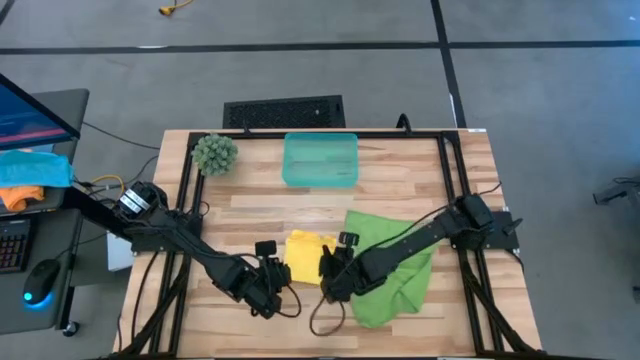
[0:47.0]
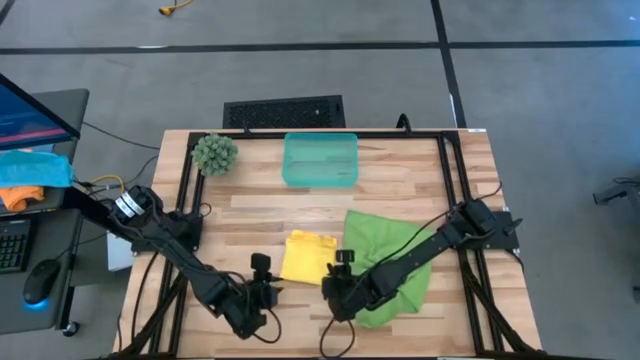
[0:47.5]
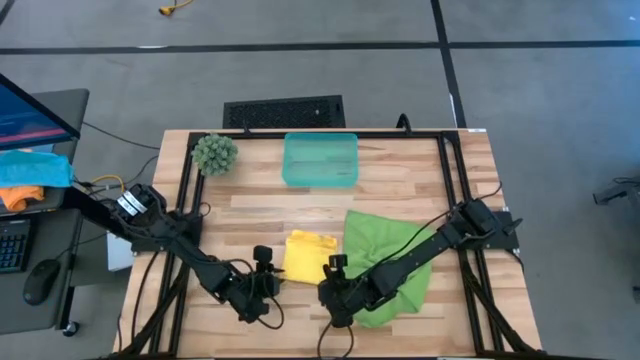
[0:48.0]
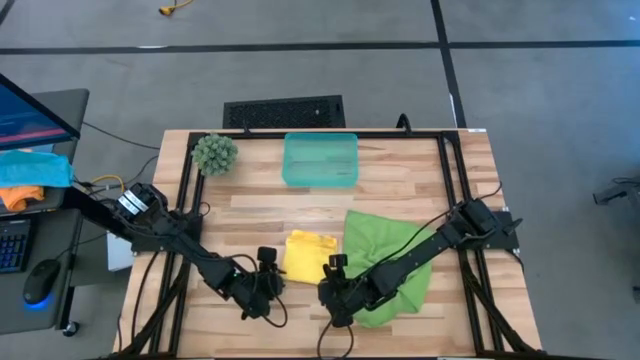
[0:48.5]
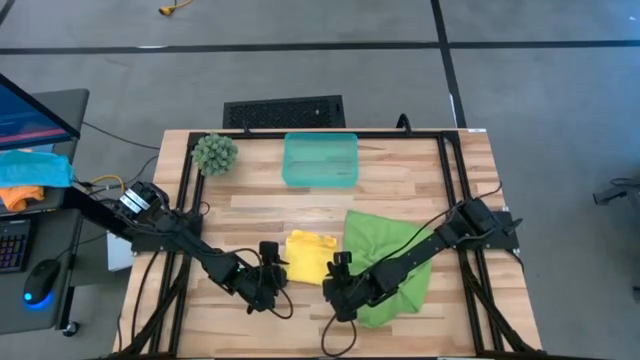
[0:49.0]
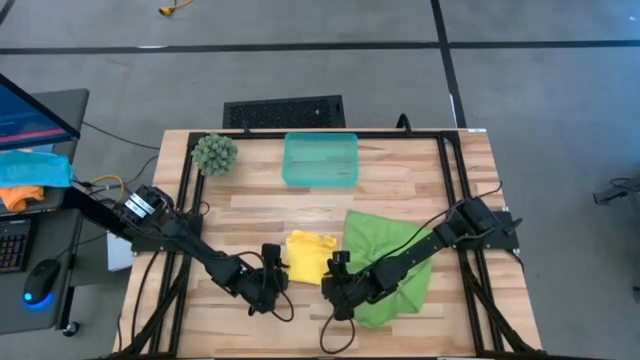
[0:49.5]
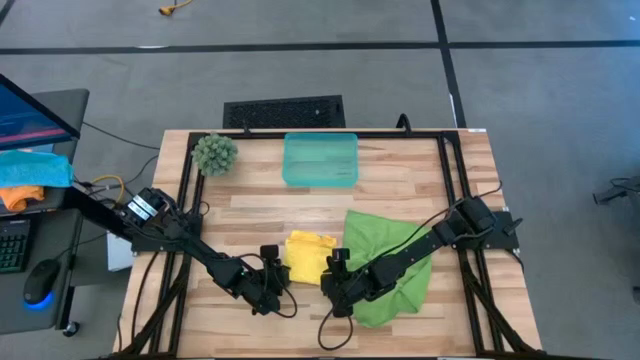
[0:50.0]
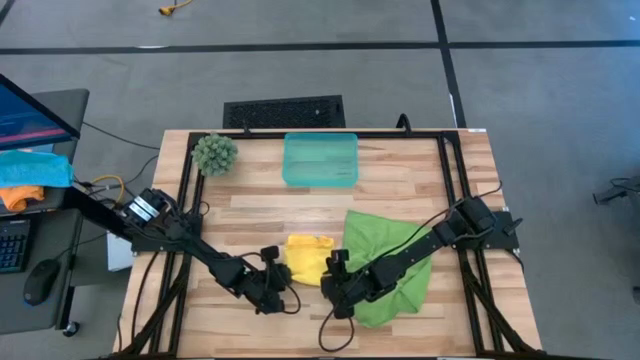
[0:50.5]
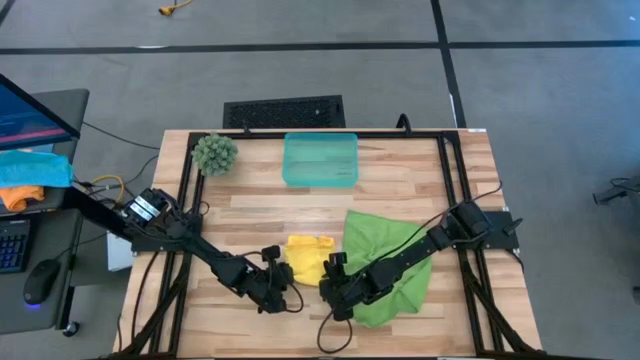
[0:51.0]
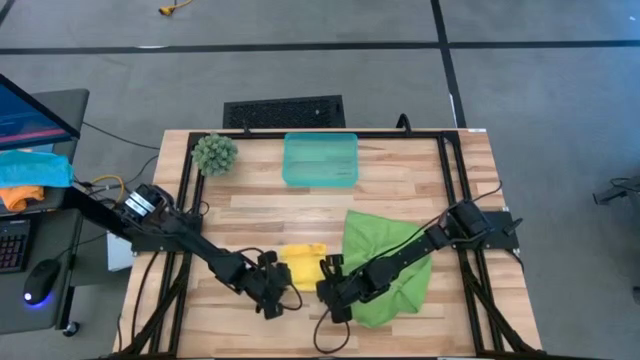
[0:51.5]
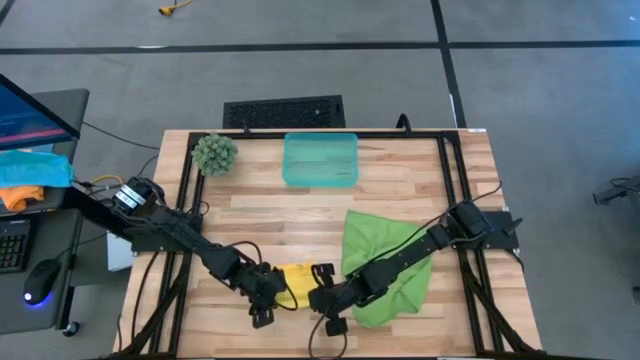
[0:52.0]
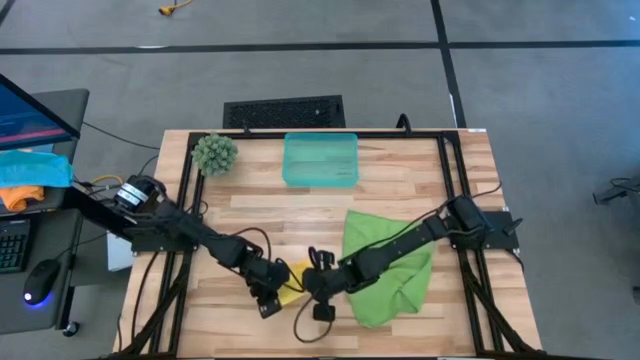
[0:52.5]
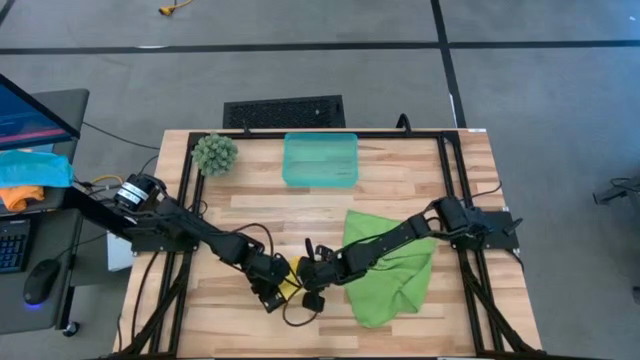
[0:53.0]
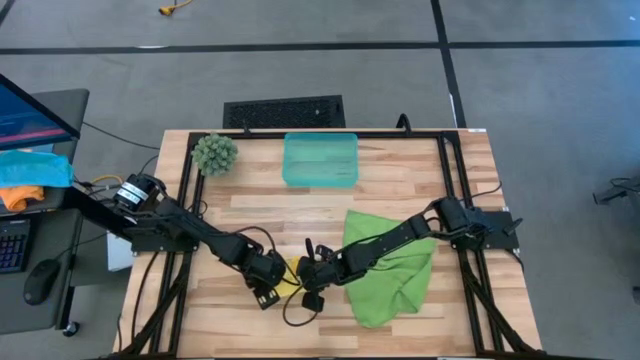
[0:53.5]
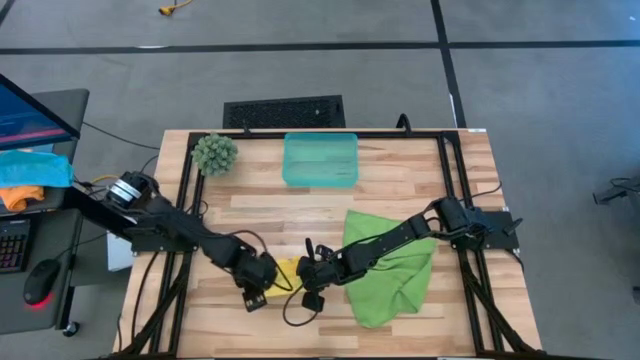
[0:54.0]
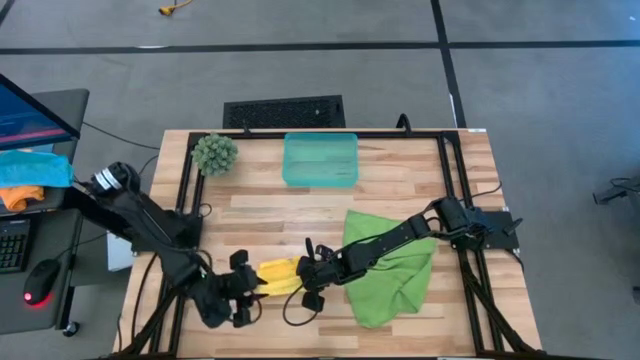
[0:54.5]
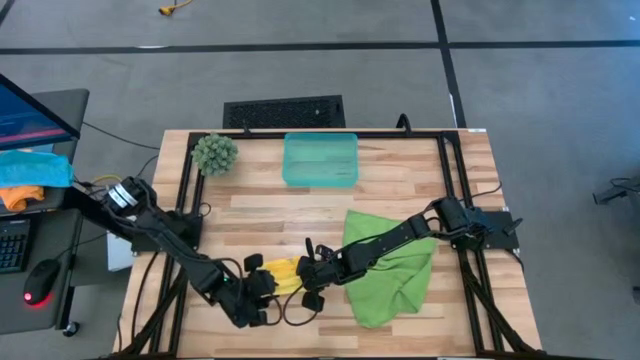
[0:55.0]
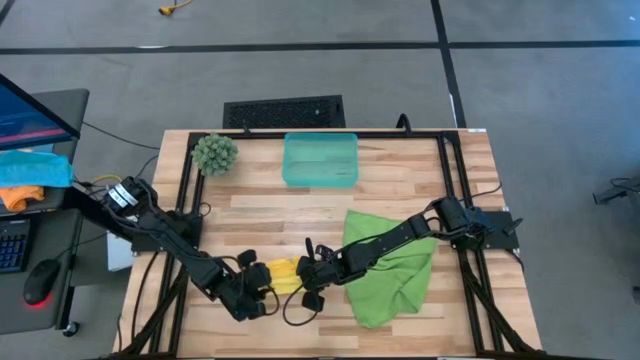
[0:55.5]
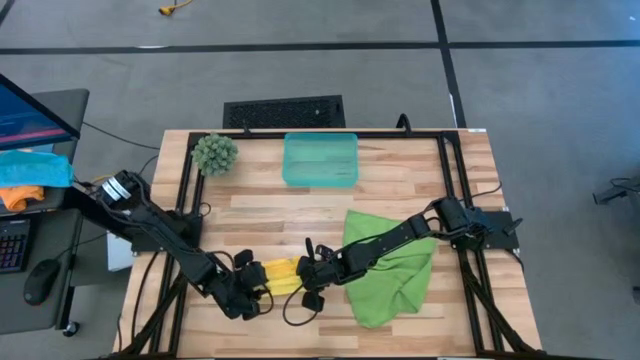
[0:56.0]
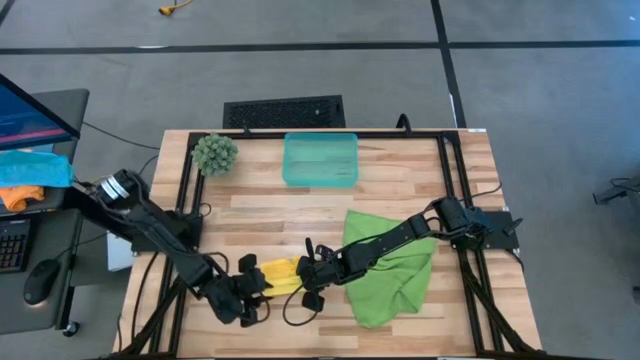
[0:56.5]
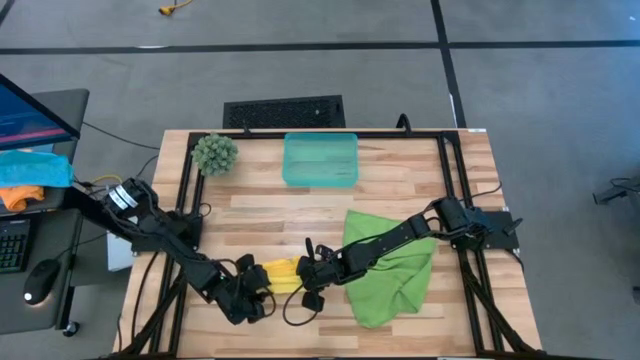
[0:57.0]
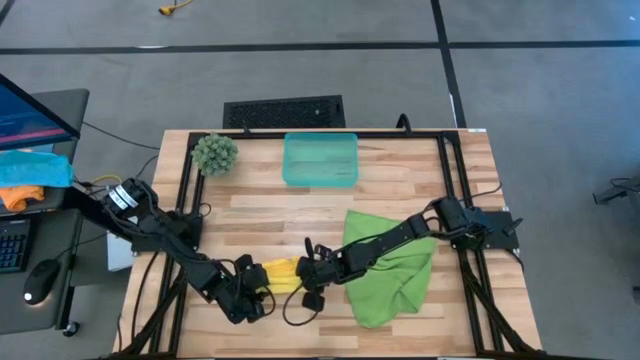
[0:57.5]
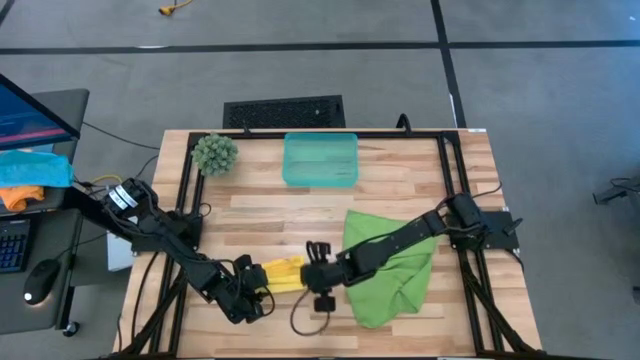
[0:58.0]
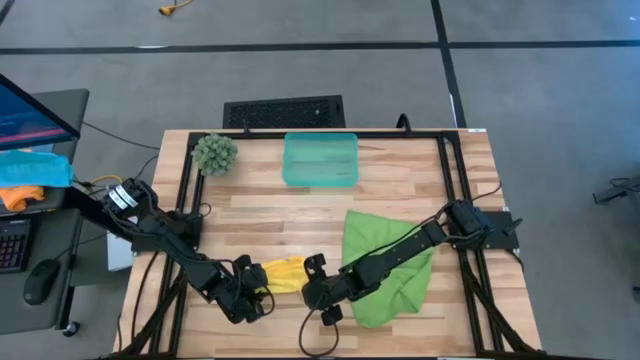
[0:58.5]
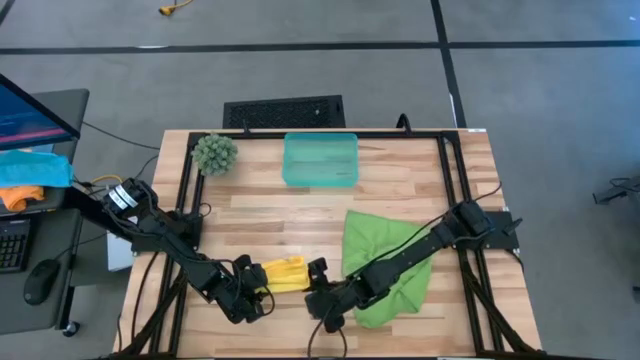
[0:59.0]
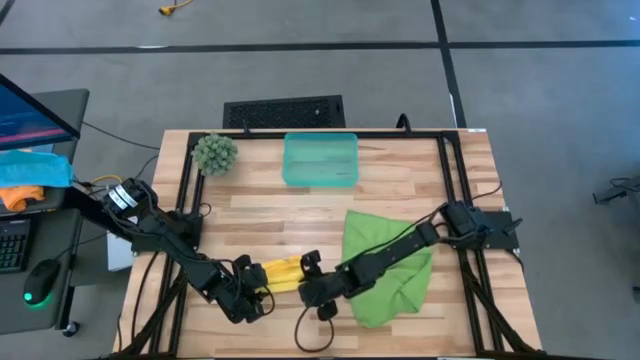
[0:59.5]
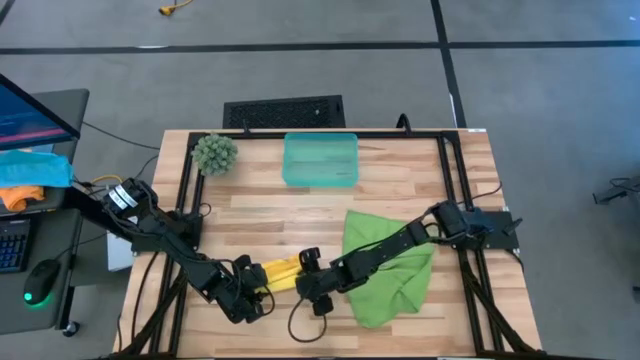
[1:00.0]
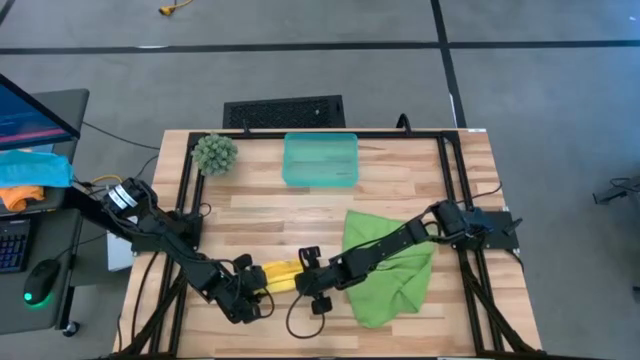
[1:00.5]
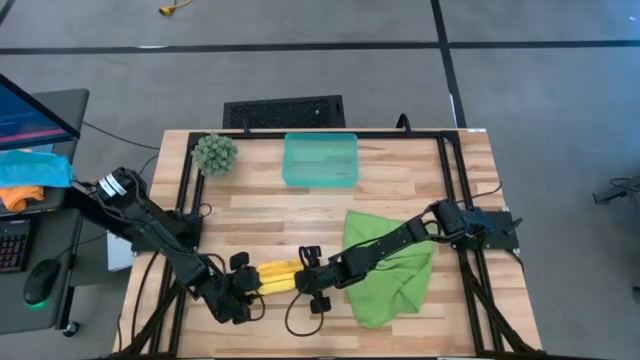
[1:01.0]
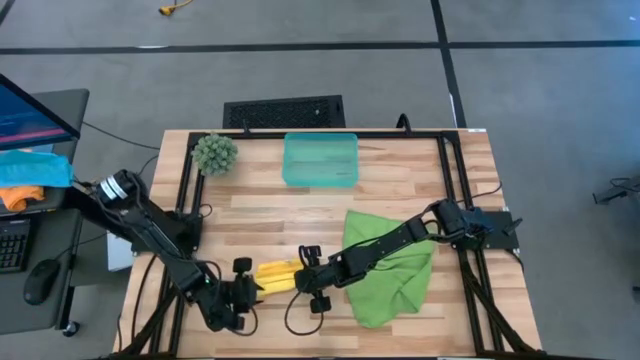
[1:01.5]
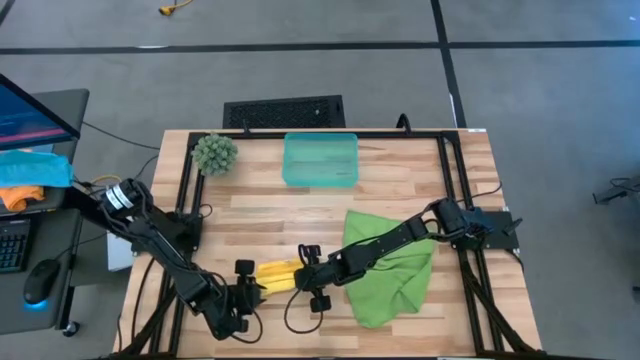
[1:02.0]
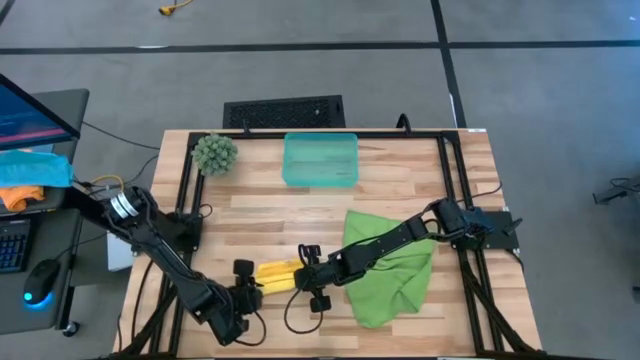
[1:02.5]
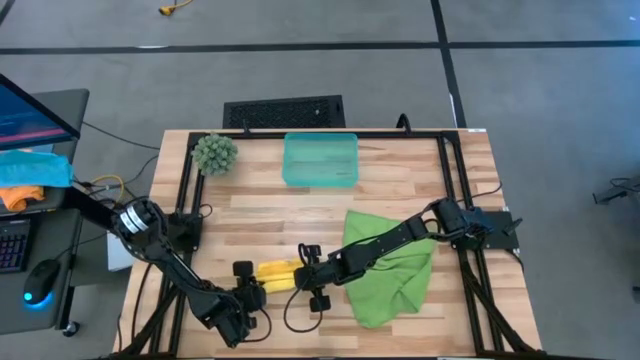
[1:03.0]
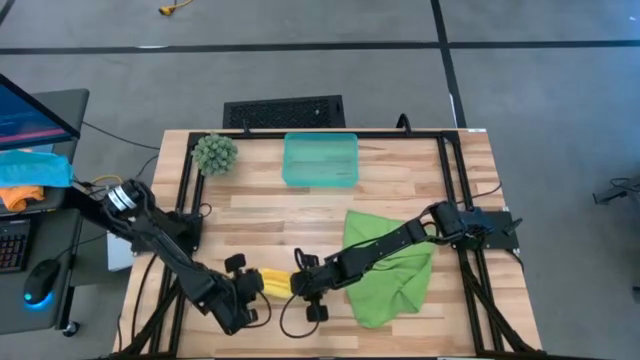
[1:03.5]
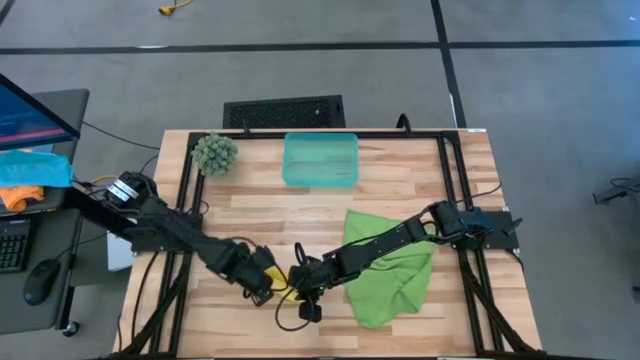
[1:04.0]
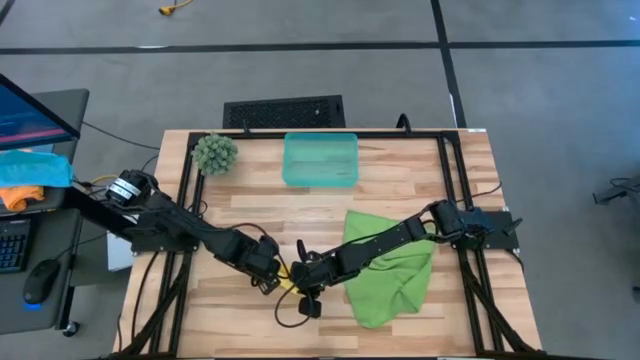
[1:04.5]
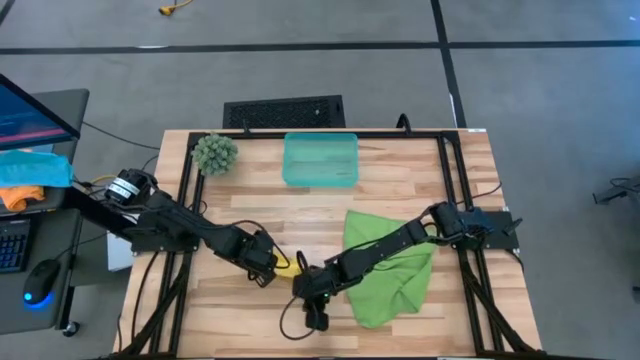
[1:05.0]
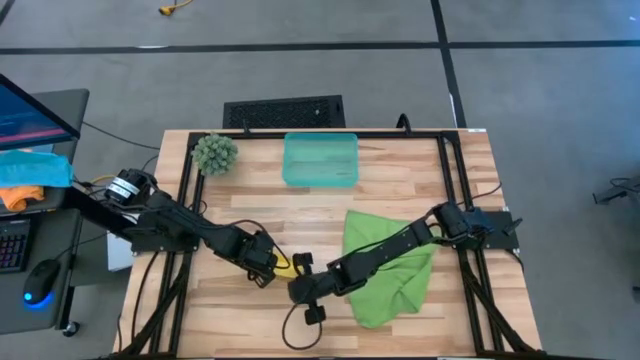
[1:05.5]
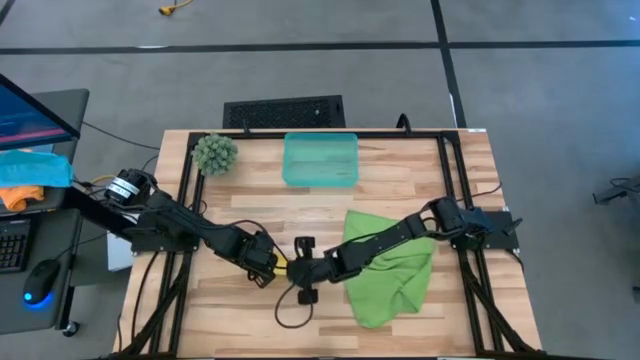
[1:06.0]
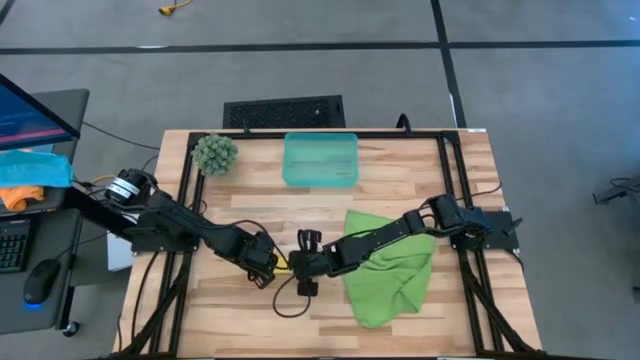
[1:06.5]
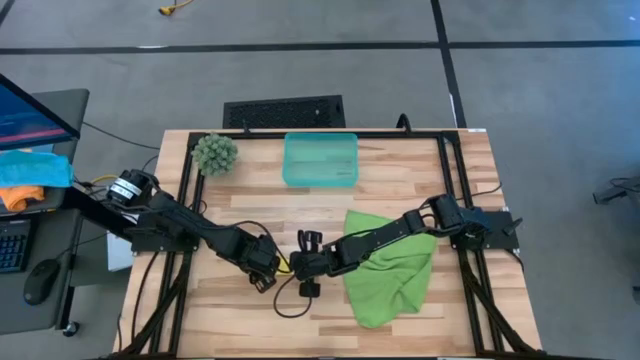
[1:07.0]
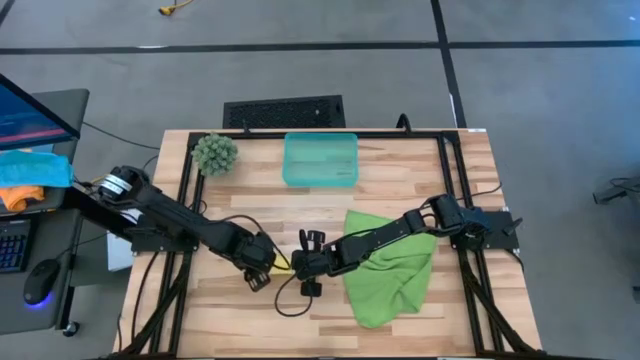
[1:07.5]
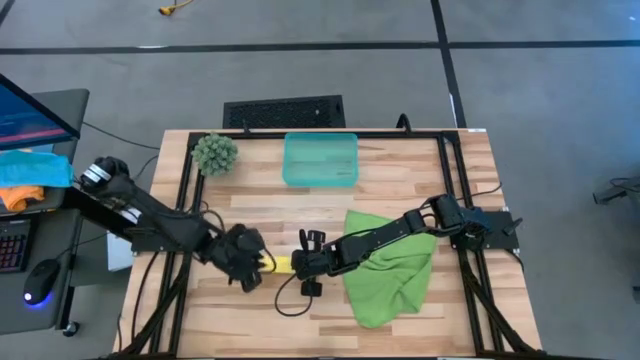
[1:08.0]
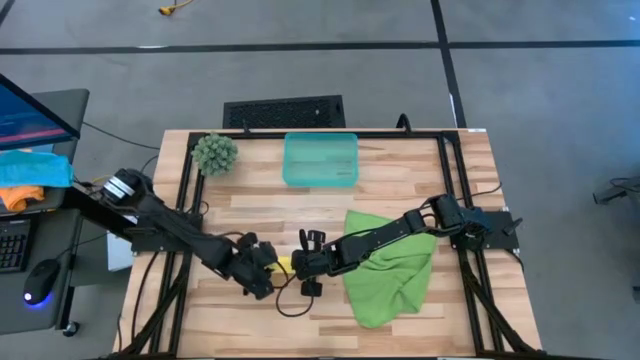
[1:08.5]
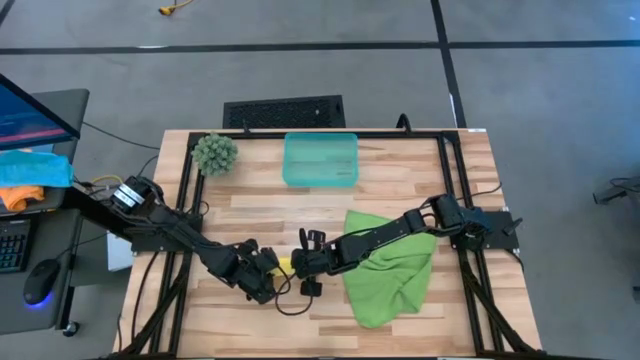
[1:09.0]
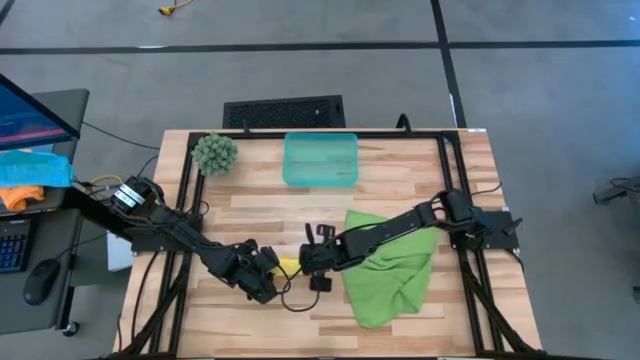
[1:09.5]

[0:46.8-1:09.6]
Task: Roll microfiber towels into tight, uniform cylinder then place into a basket
Roll the yellow microfiber cloth
